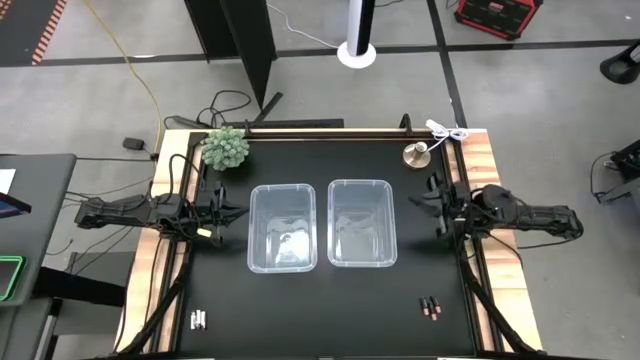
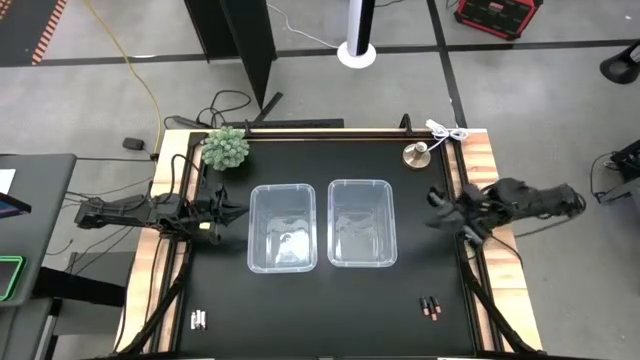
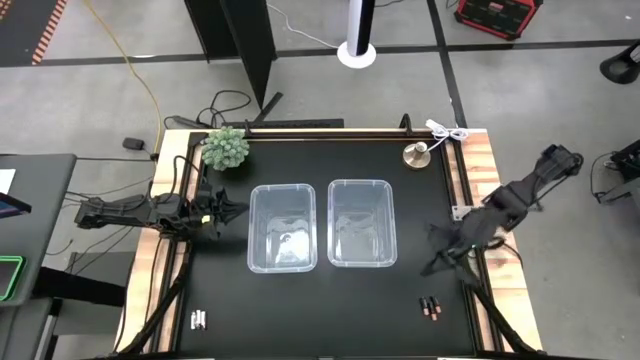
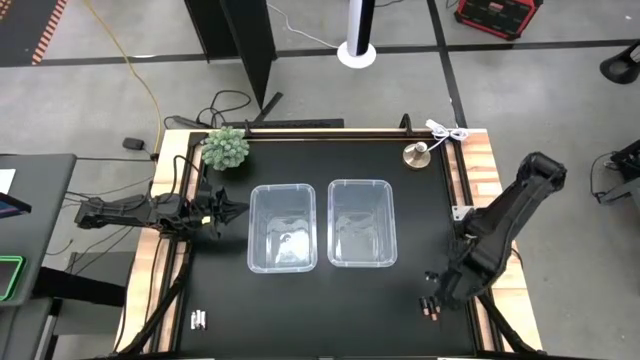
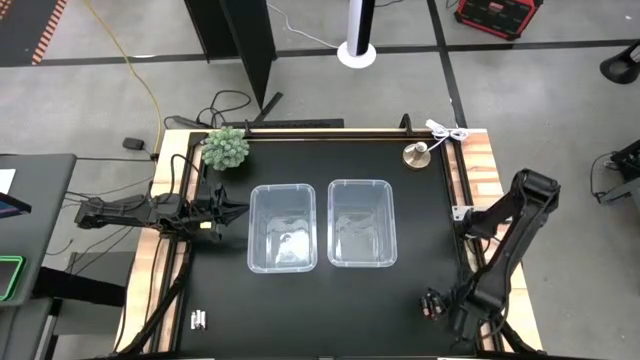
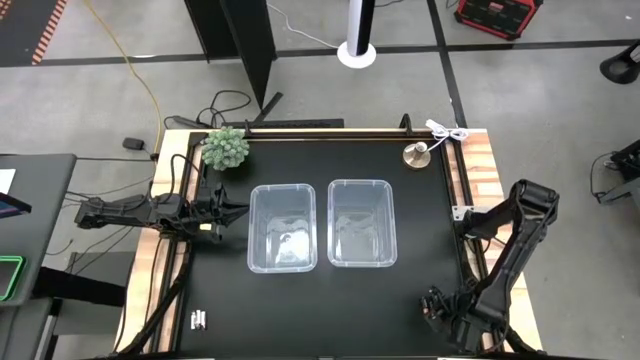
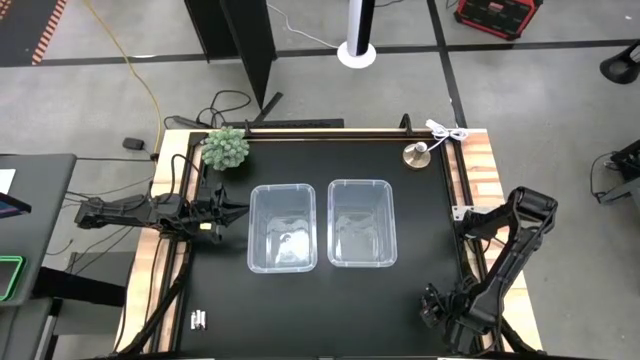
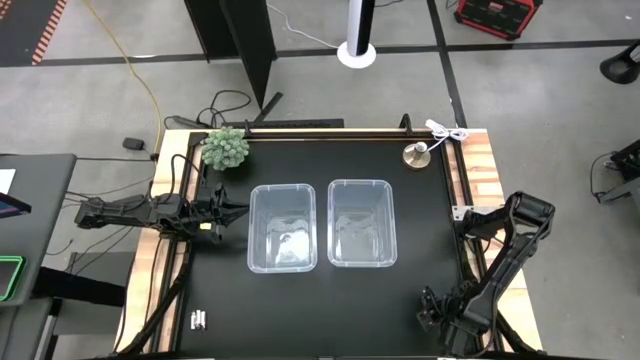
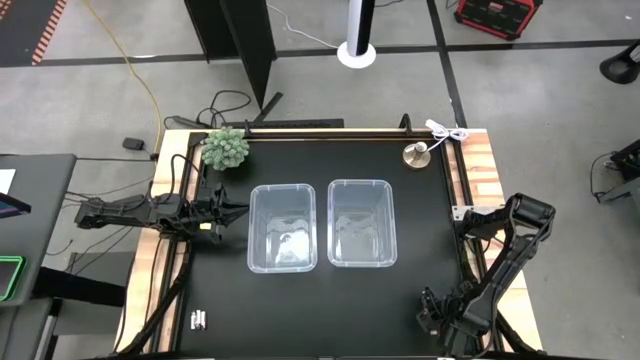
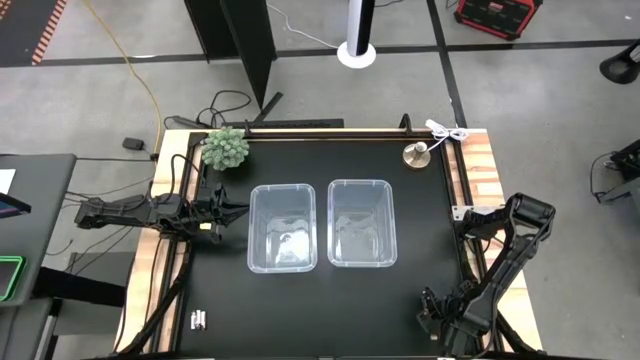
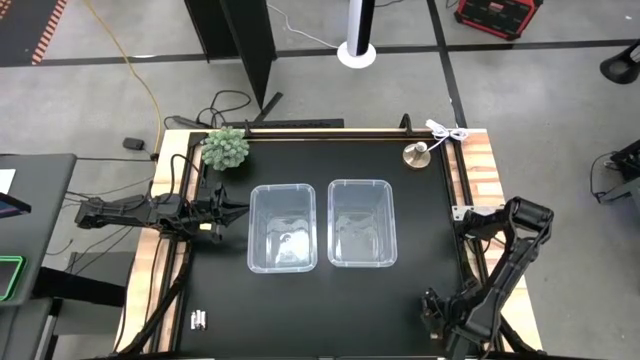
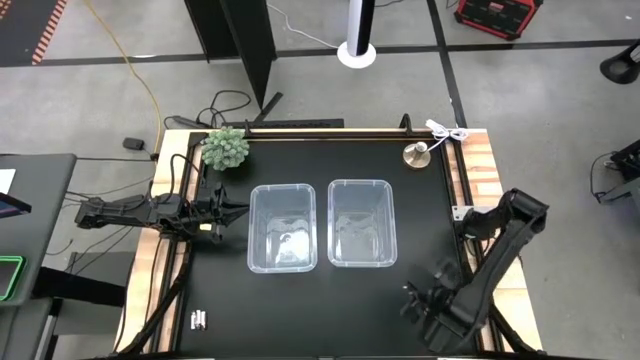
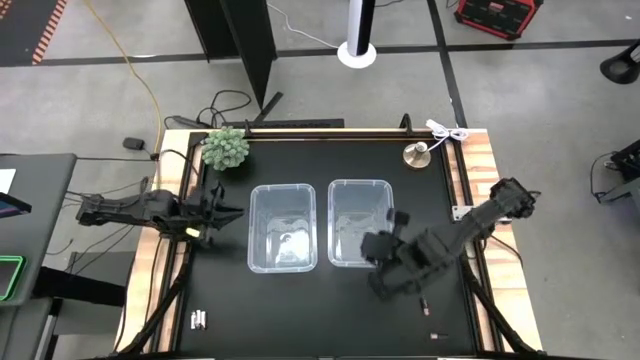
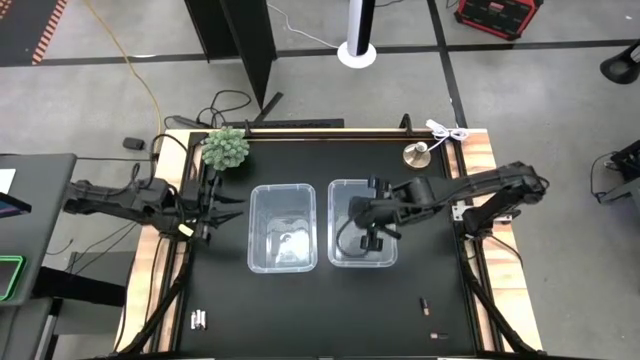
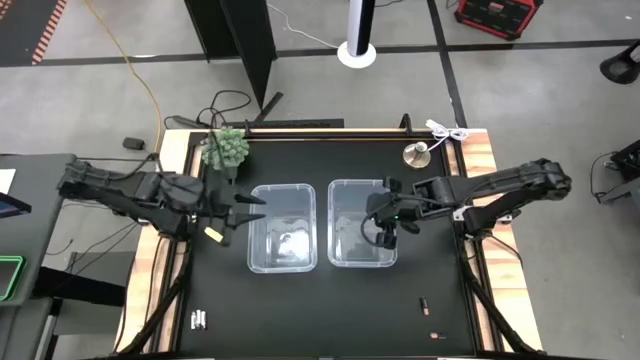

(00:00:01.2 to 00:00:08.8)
Task: Sort batteries
Put the right brown battery into the right transparent bin

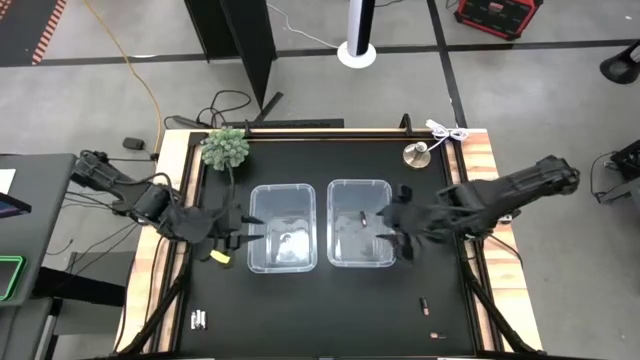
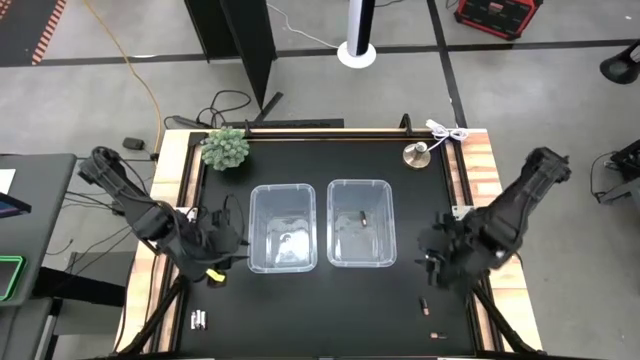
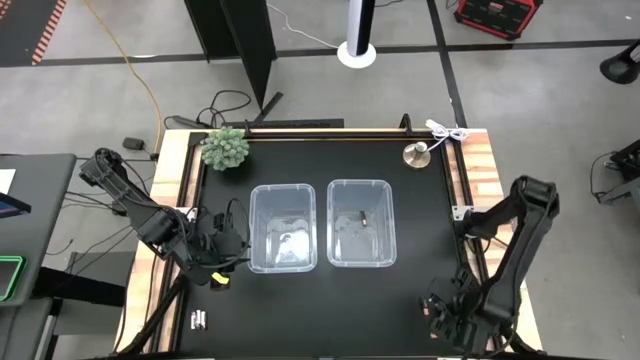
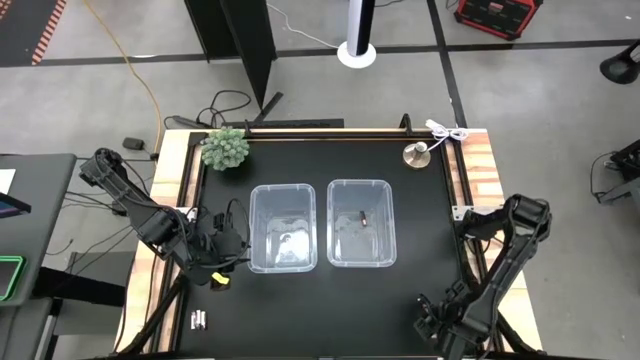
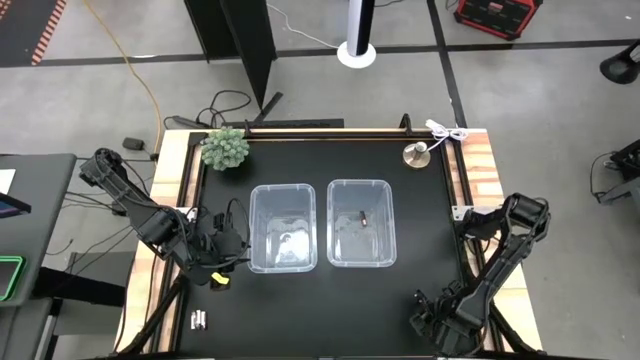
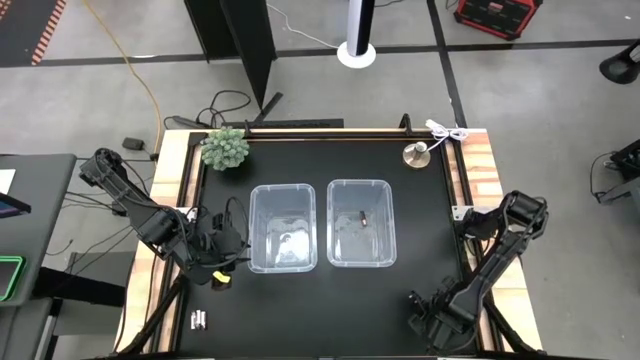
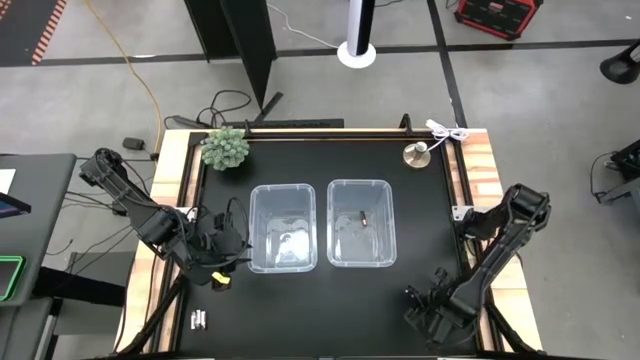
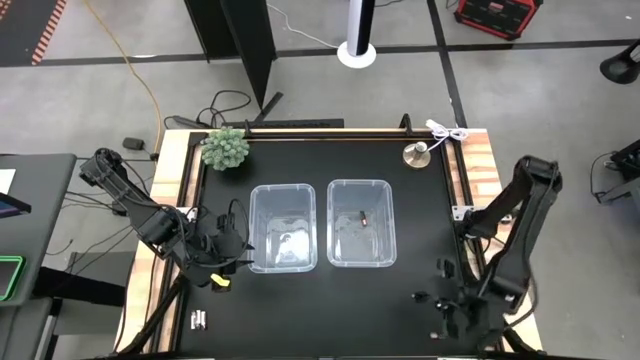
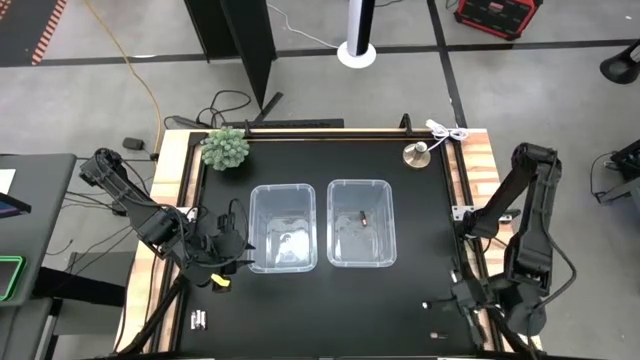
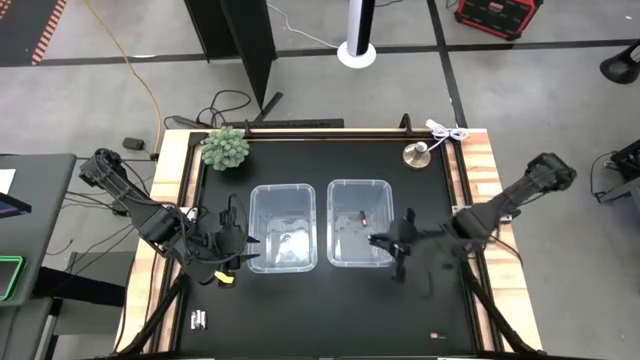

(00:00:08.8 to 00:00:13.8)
Put the top brown battery into the right transparent bin

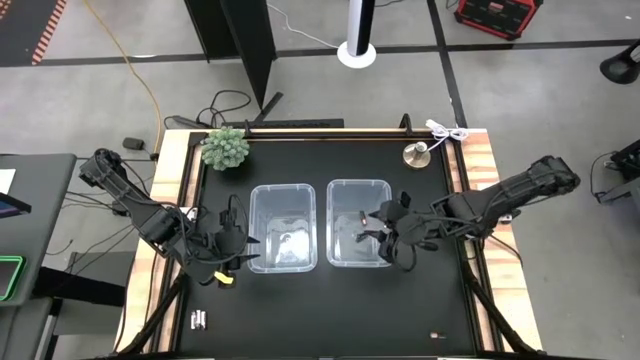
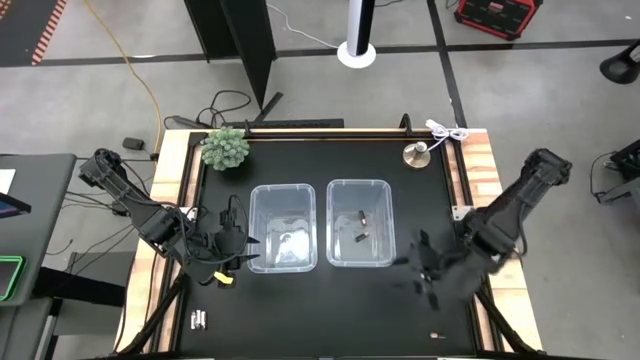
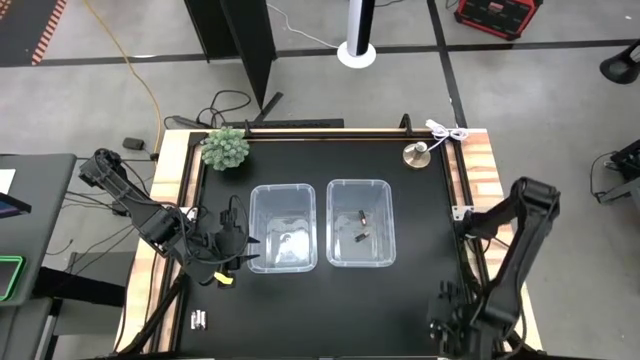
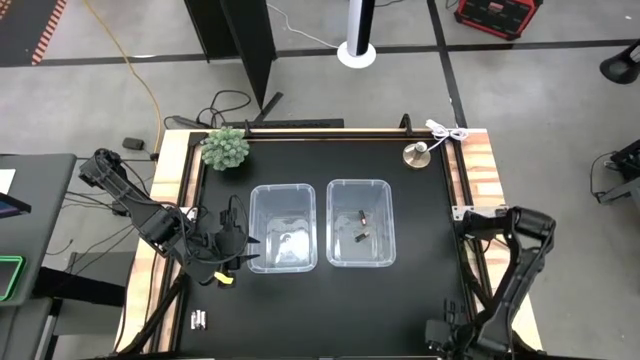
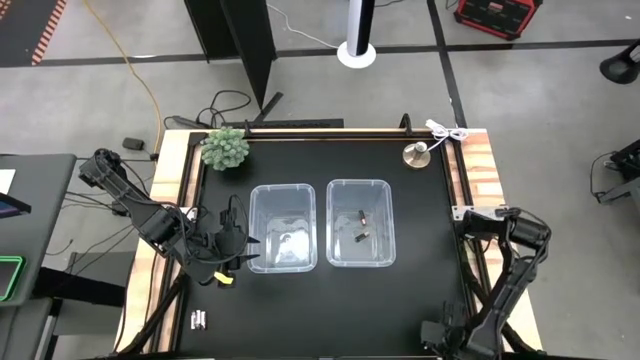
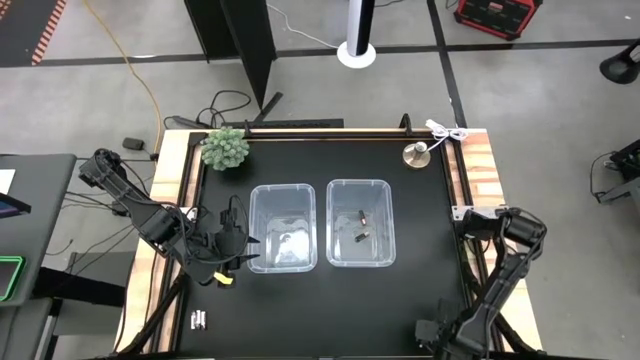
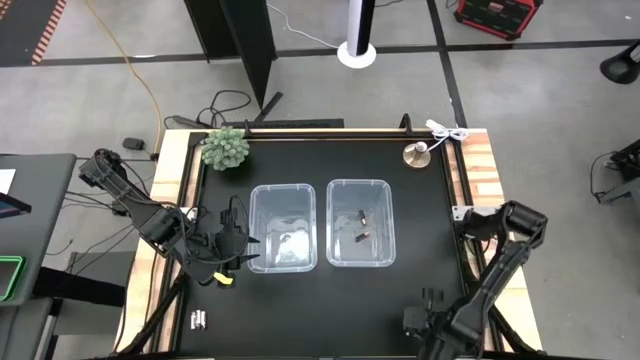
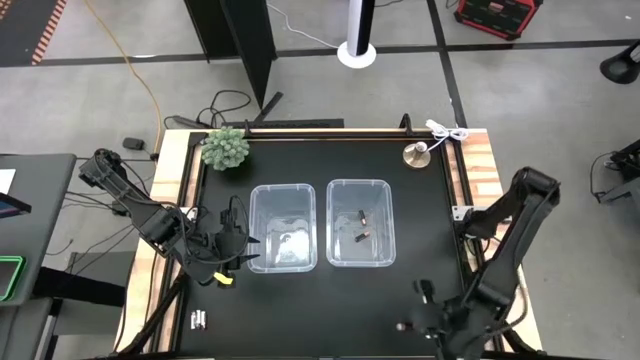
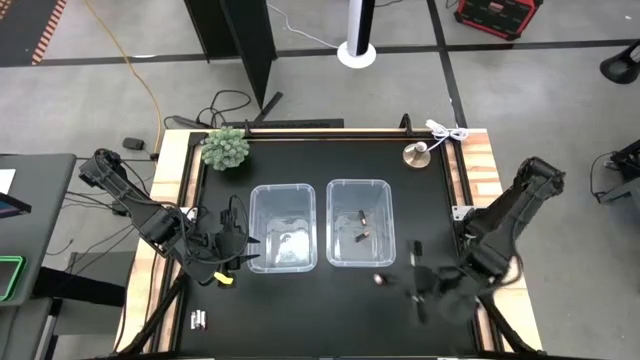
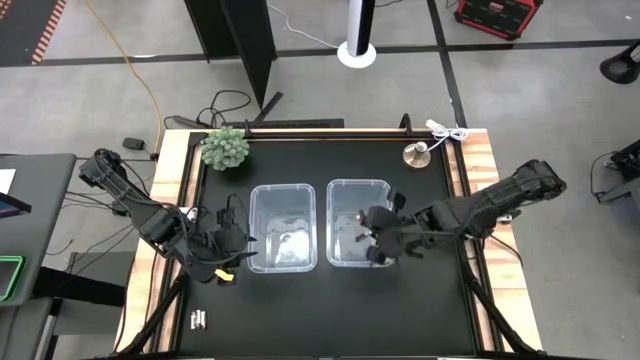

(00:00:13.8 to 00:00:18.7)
Put the brown battery into the right transparent bin

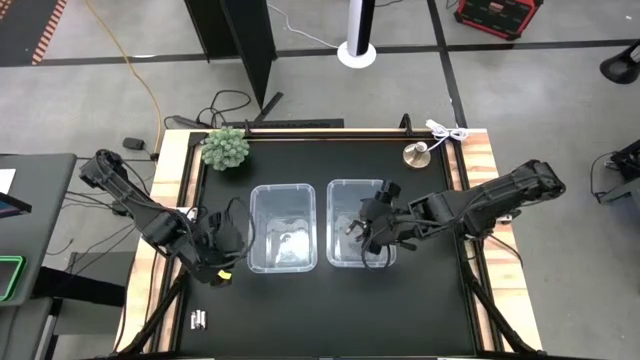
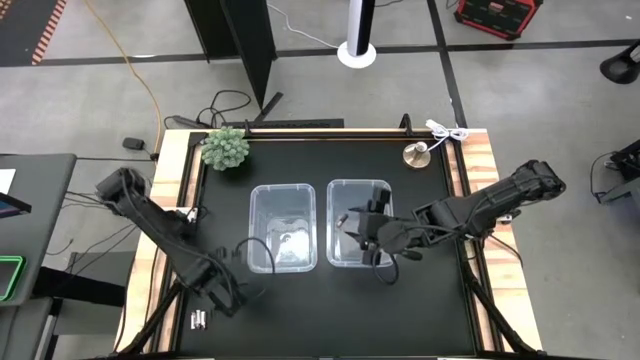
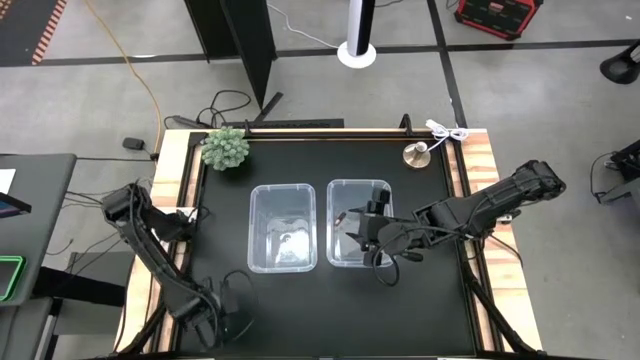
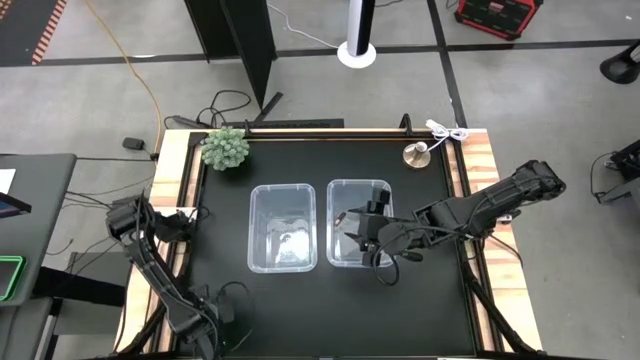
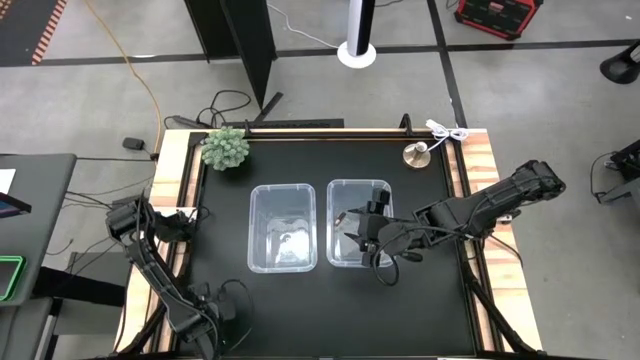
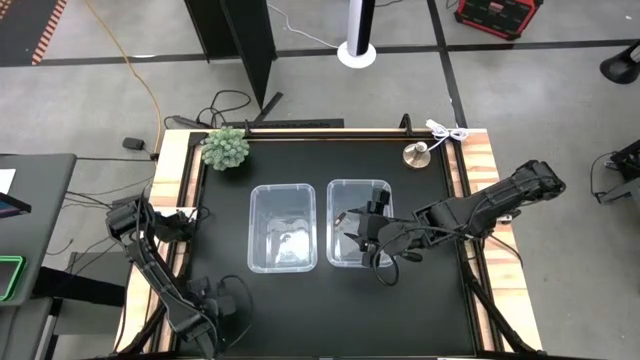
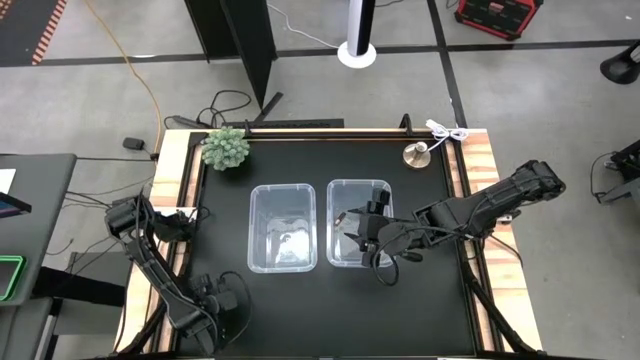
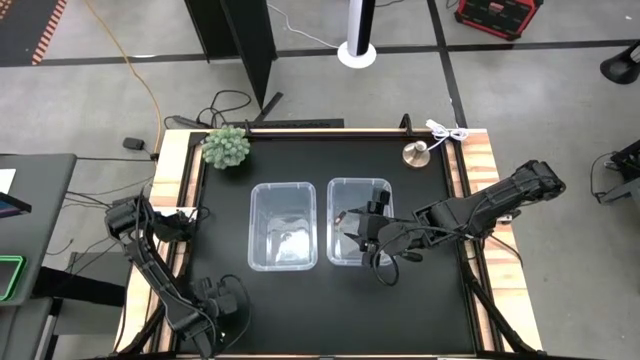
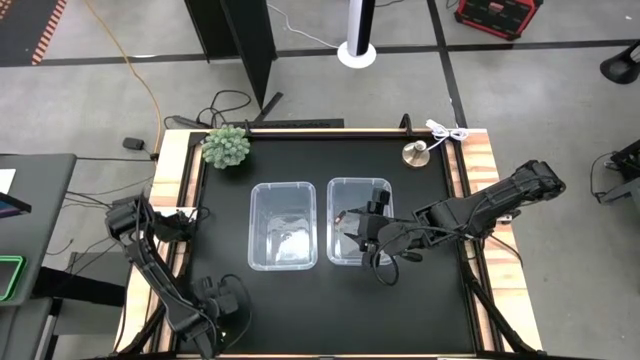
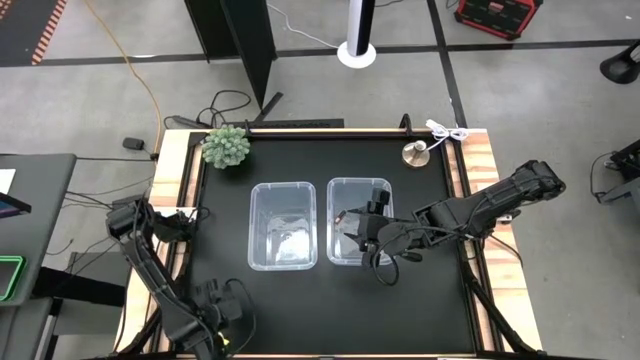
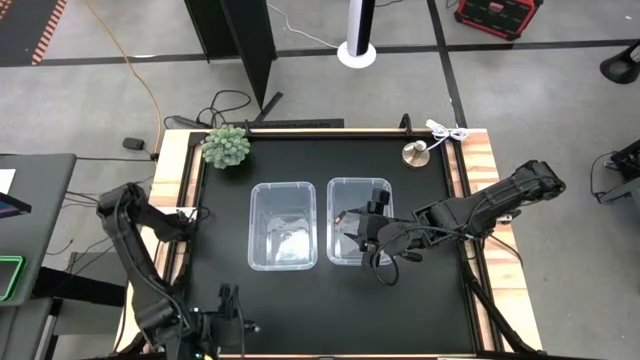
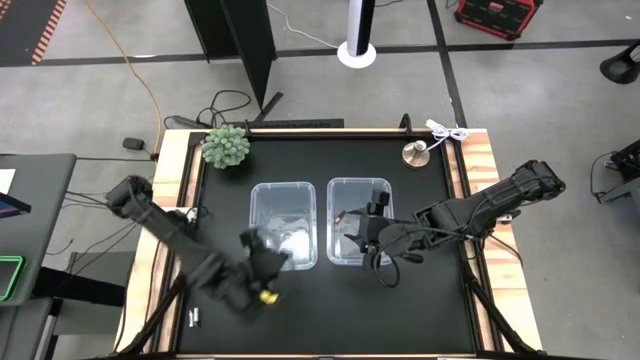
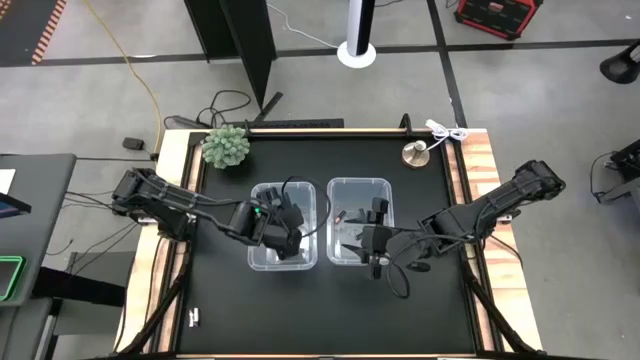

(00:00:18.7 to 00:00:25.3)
Put the right silver battery into the left transparent bin
